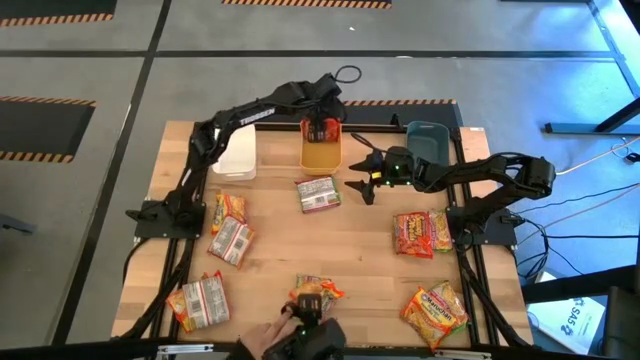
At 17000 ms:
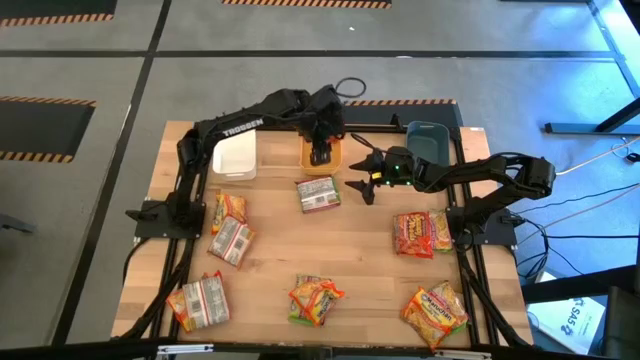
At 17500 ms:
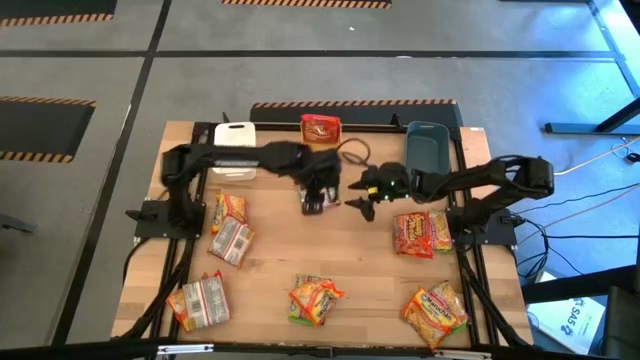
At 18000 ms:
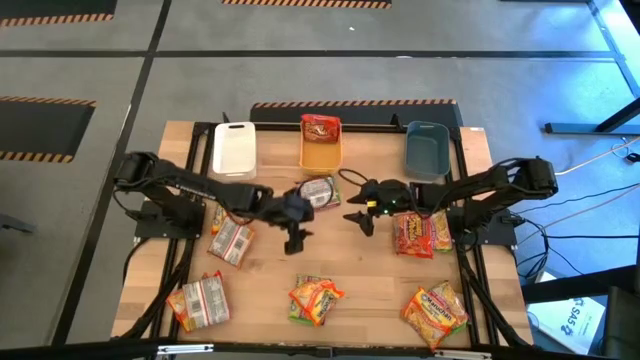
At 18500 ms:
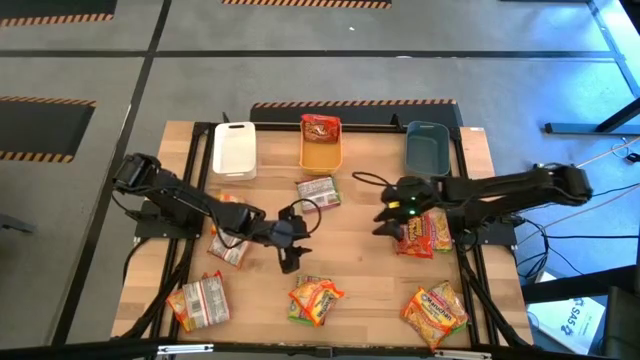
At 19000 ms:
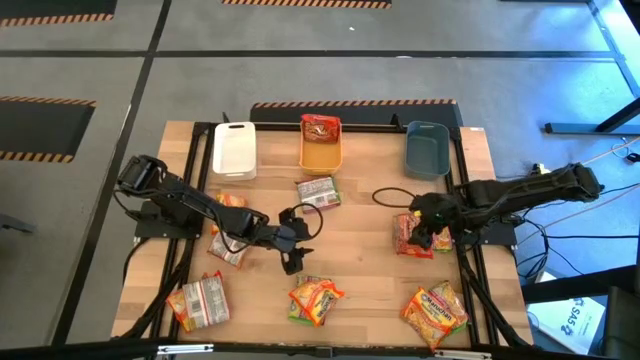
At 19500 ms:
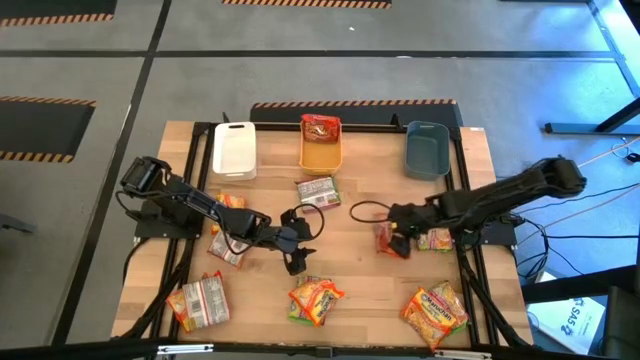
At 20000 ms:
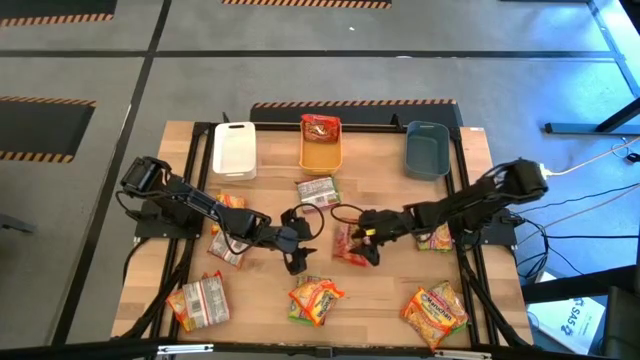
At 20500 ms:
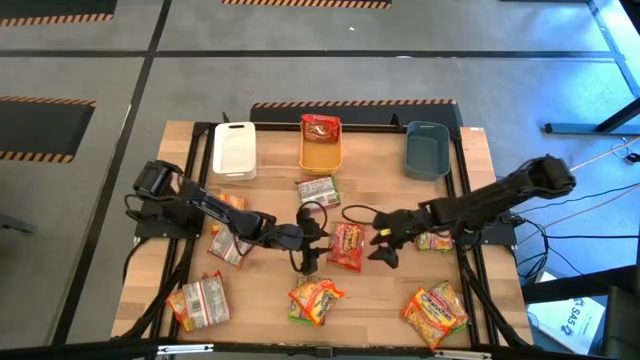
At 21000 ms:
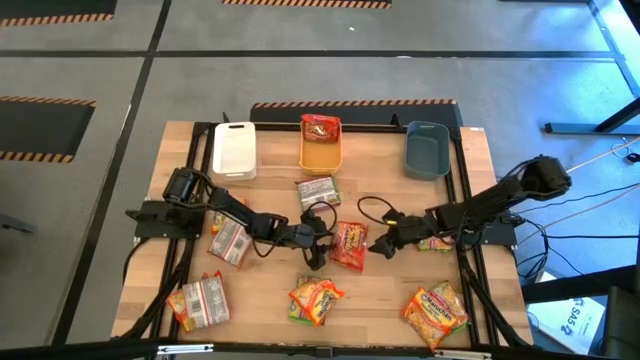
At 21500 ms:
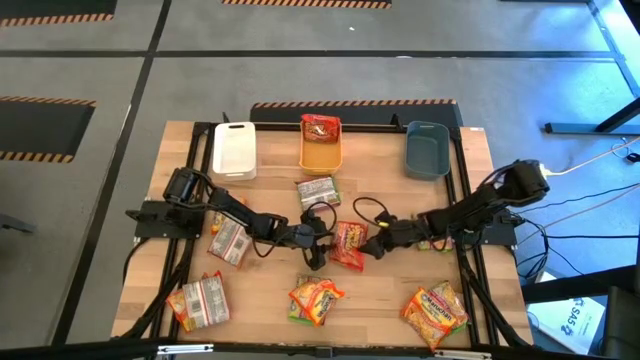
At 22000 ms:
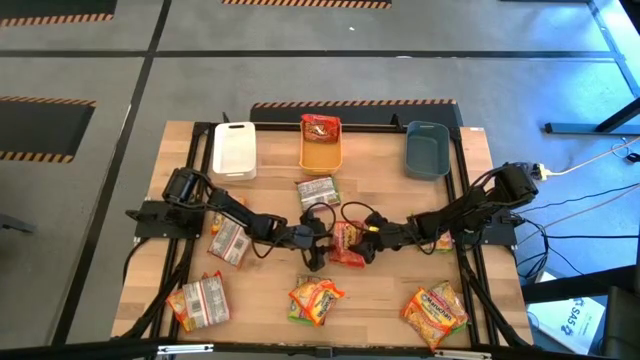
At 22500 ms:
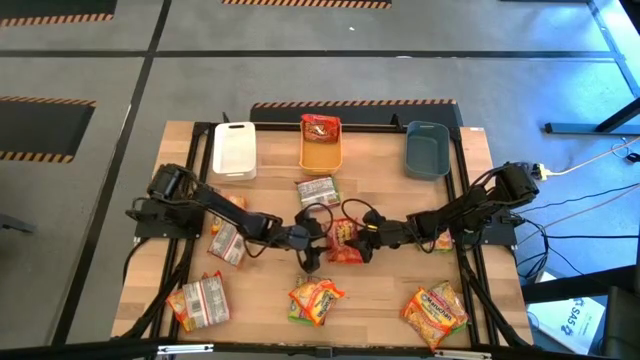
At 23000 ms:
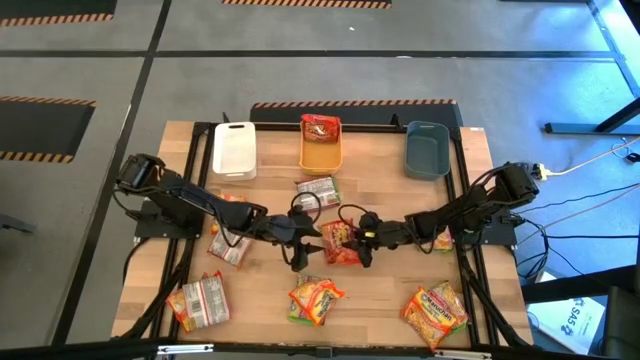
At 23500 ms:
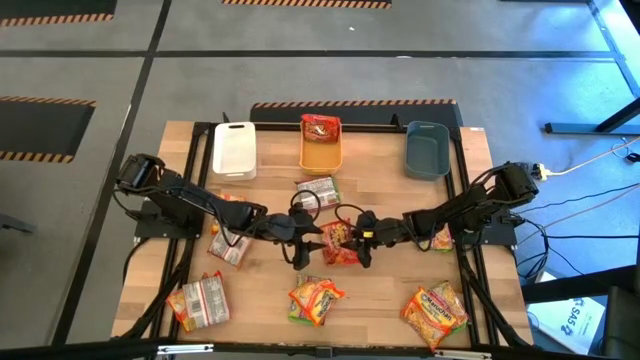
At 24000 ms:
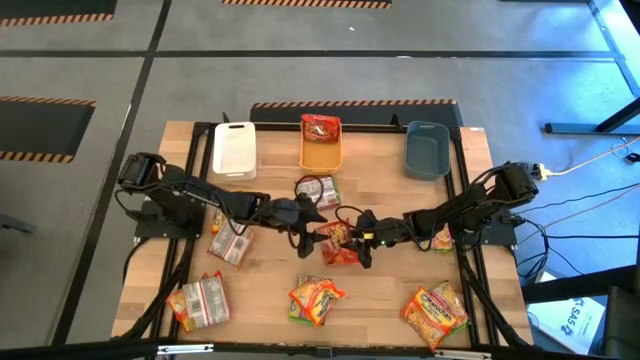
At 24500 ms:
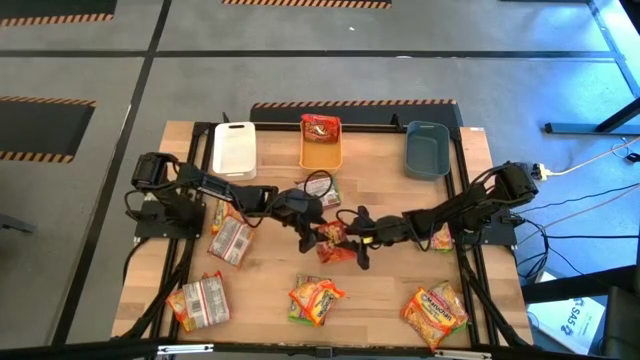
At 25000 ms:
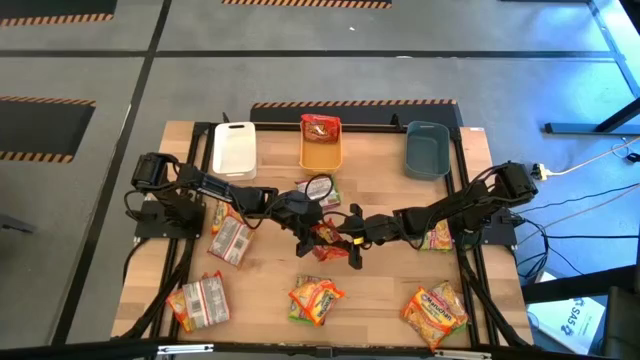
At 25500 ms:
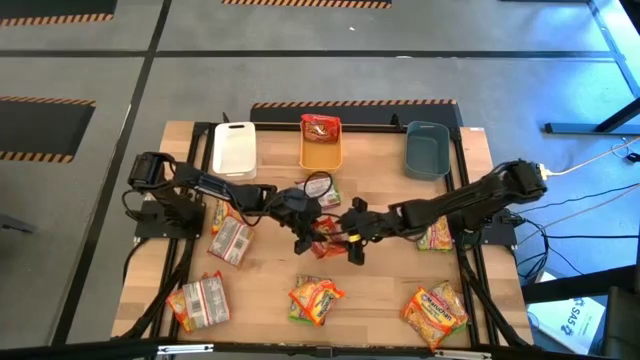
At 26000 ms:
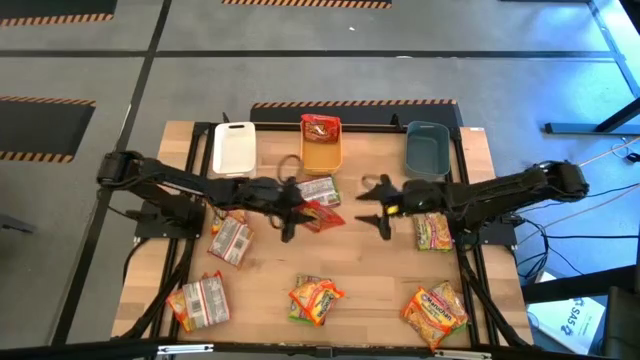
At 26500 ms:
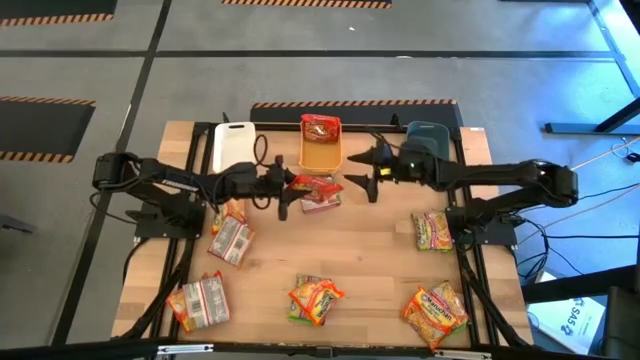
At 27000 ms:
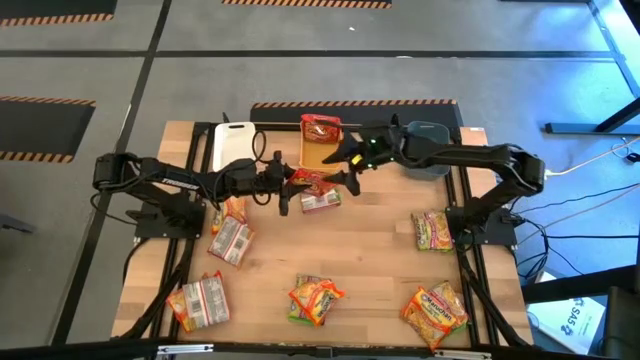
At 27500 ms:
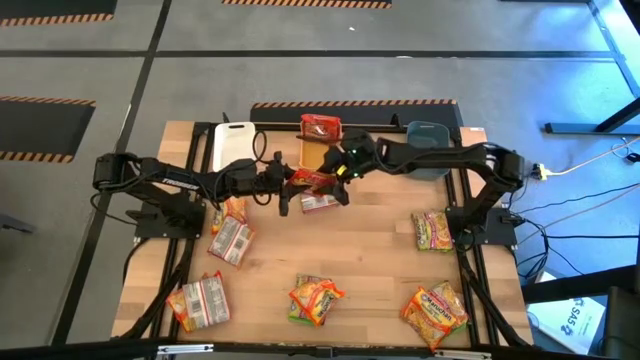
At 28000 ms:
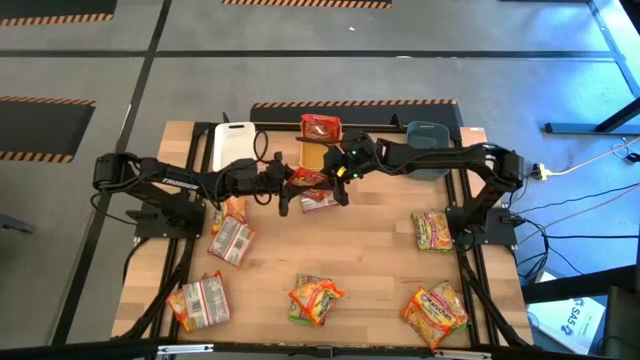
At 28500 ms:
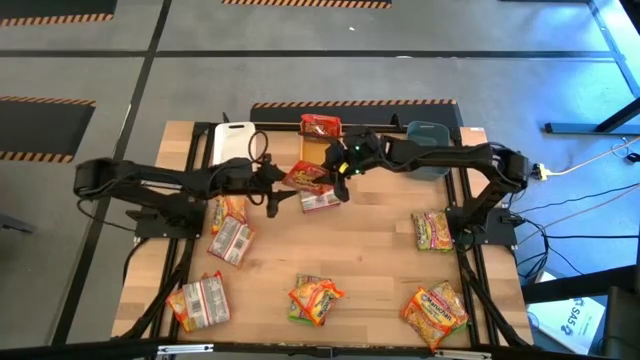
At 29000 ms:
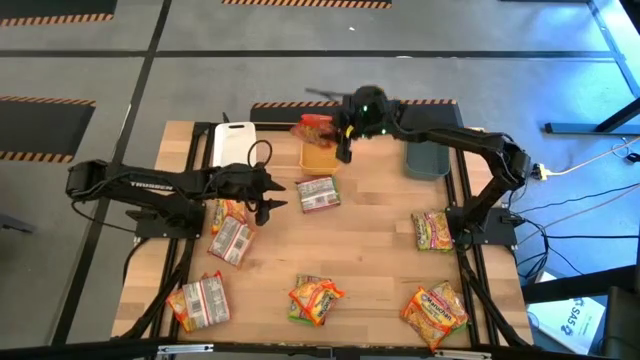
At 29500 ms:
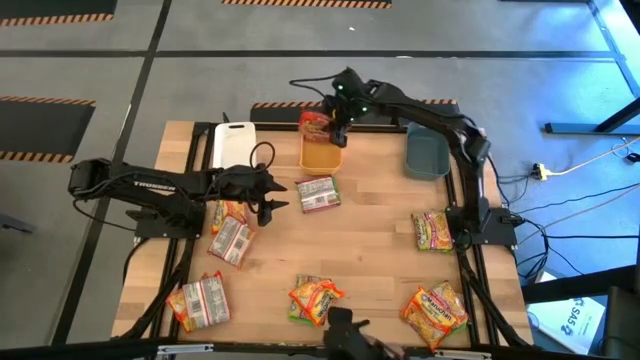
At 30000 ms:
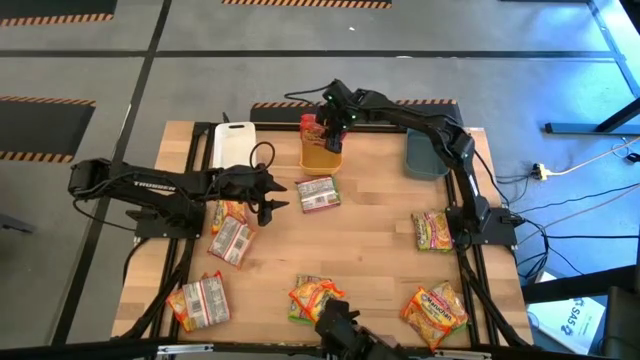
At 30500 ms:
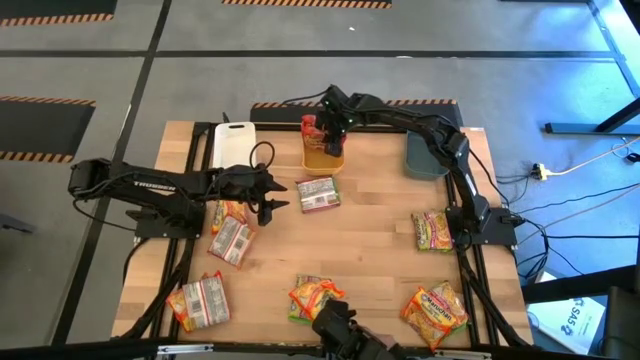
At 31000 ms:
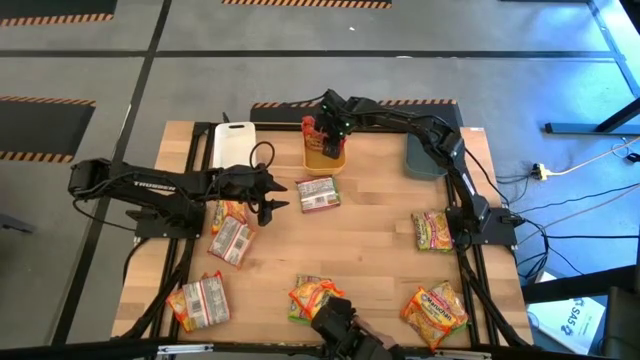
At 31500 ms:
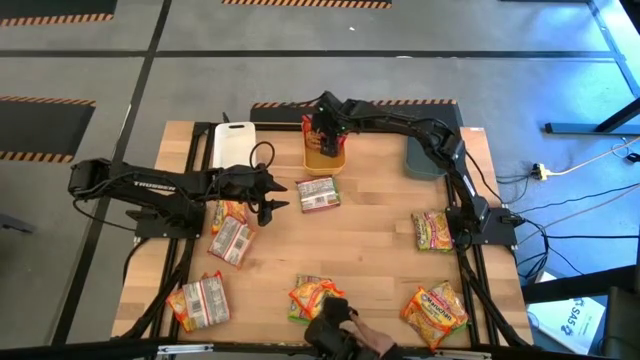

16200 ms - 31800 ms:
Task: Sort Maruchan noodles
Put the orange noodle pack into the yellow bin

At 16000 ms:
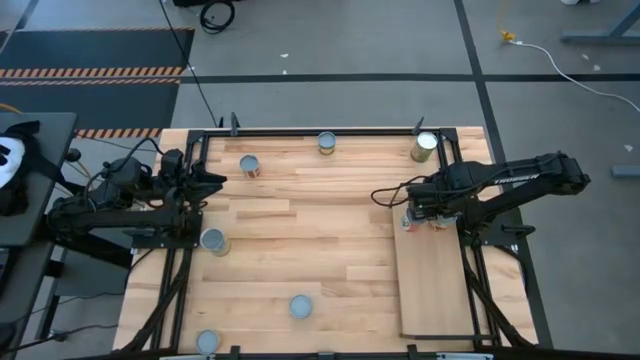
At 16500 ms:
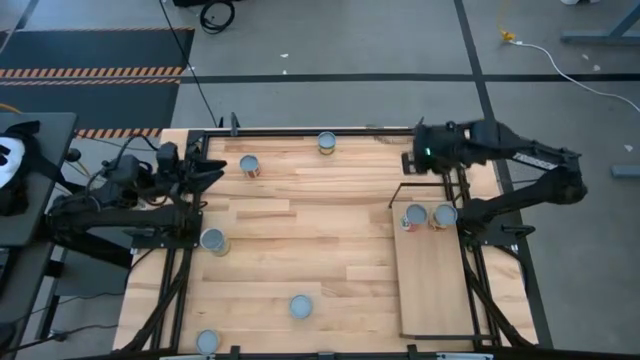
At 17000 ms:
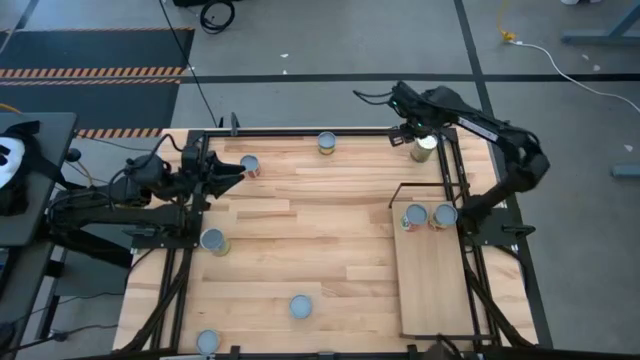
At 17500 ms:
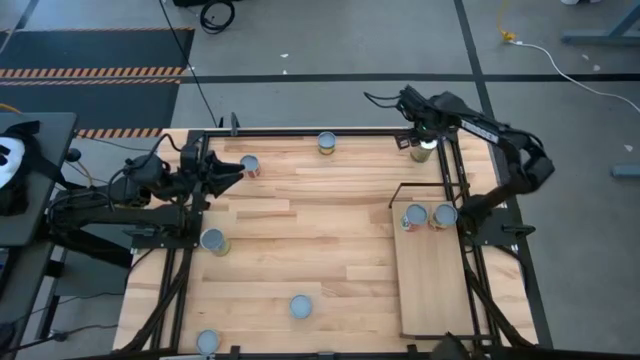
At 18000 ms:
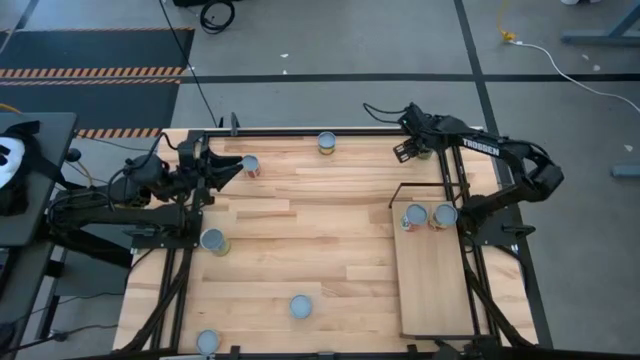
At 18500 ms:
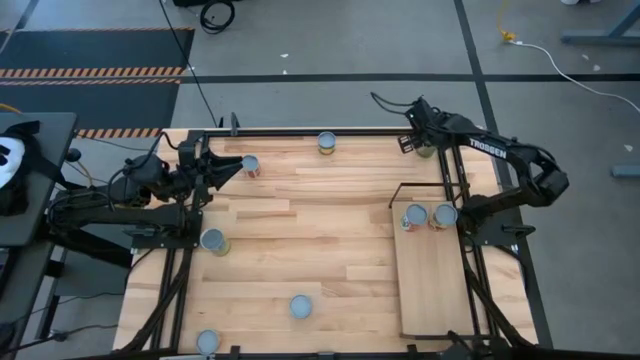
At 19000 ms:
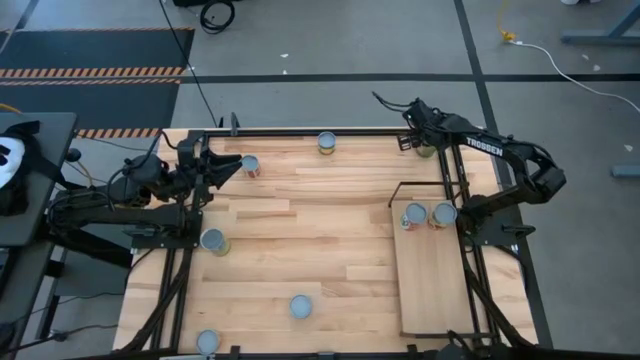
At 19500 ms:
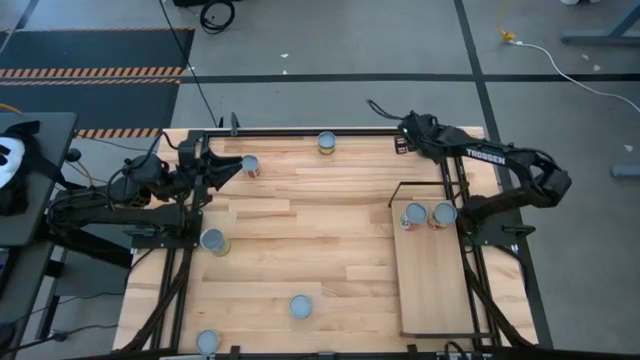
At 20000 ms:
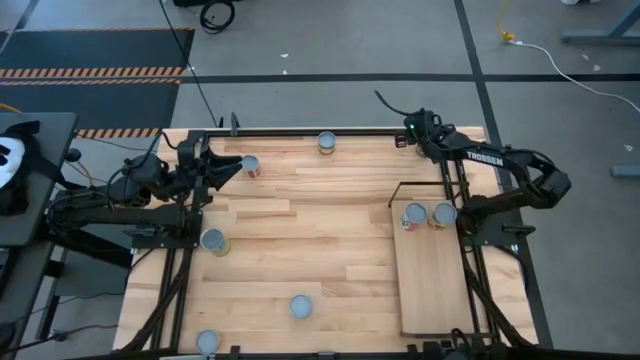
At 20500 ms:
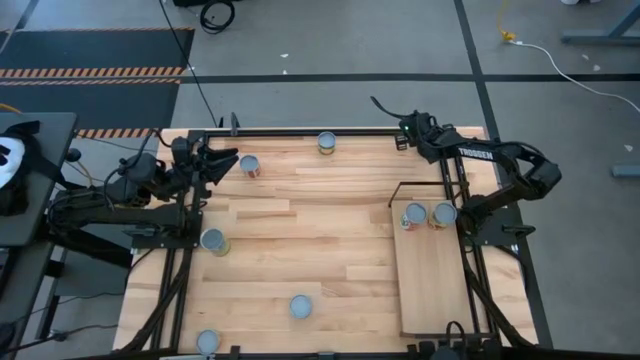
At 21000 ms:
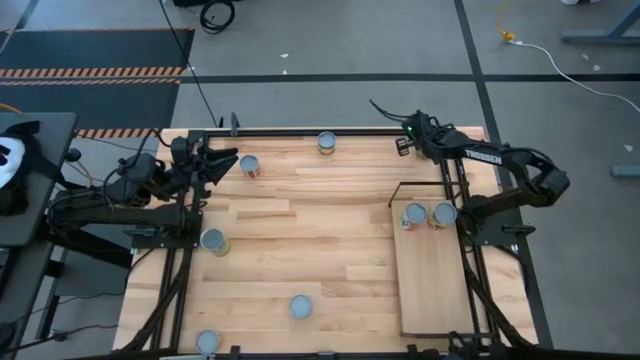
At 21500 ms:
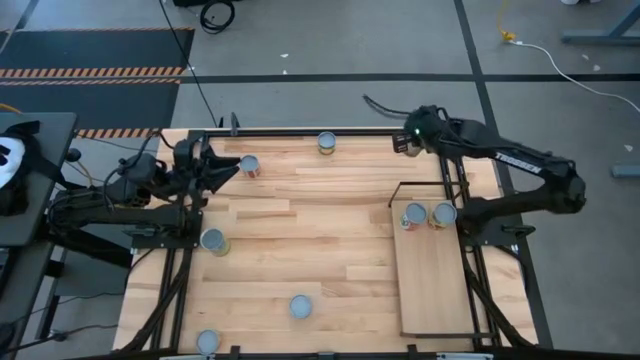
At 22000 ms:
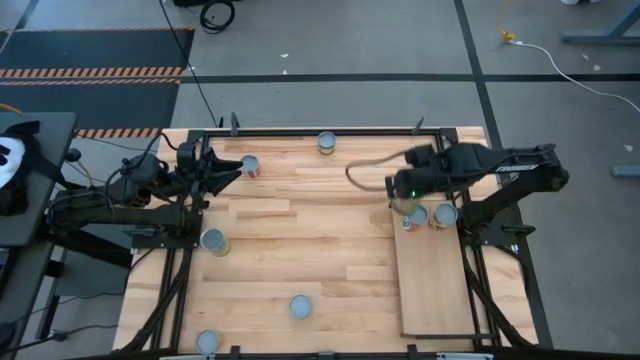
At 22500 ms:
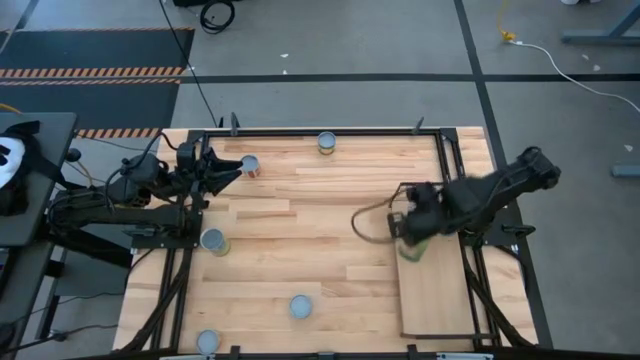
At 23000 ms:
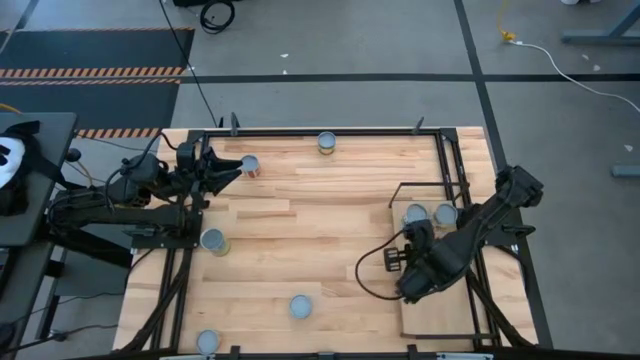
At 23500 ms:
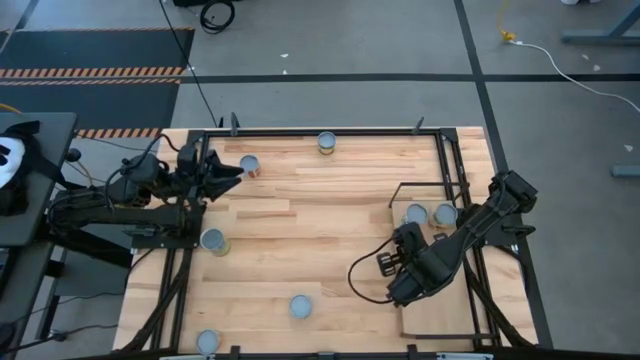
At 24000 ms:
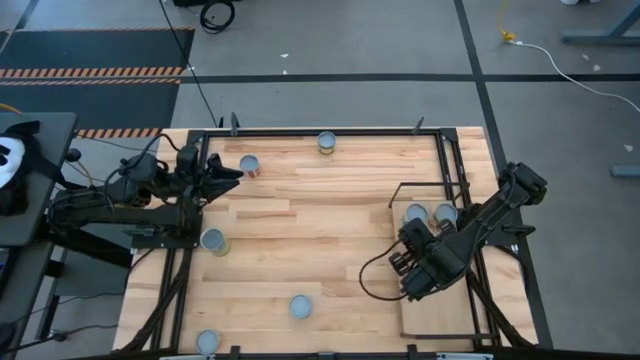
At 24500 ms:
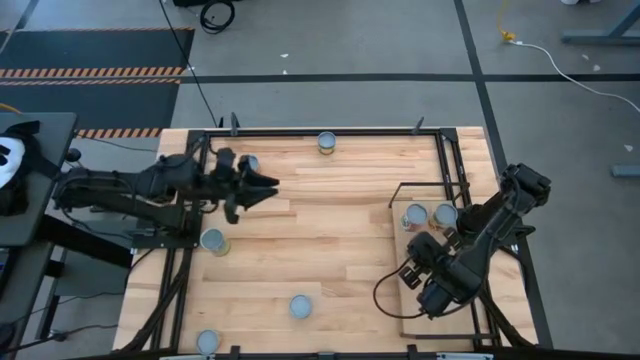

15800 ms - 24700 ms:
Task: Pick and place cans onto a shelf
Put the canned oranges on the shelf
